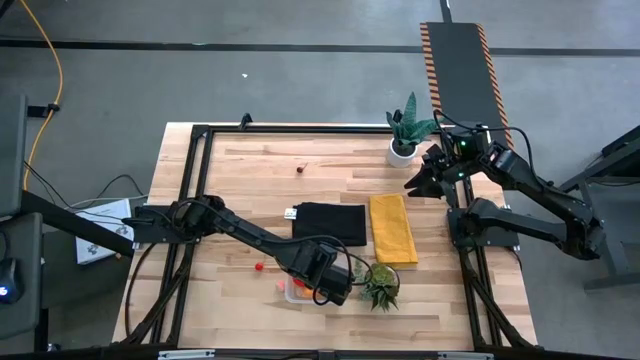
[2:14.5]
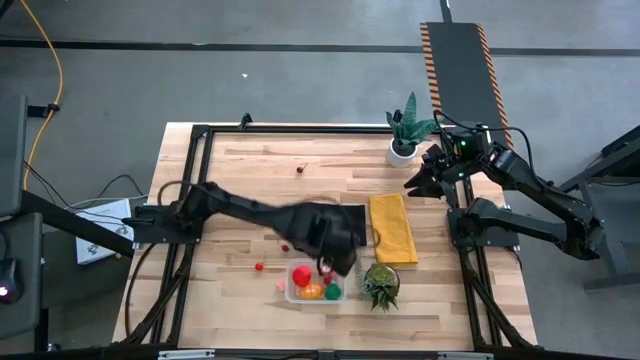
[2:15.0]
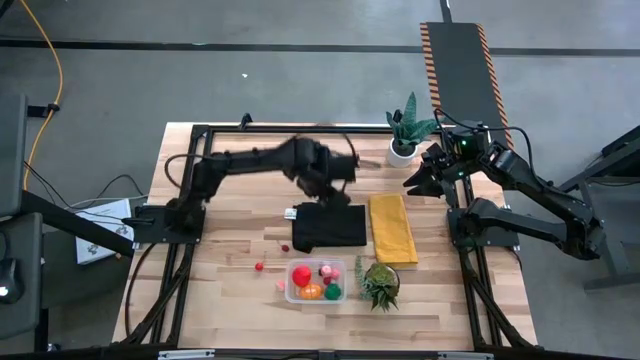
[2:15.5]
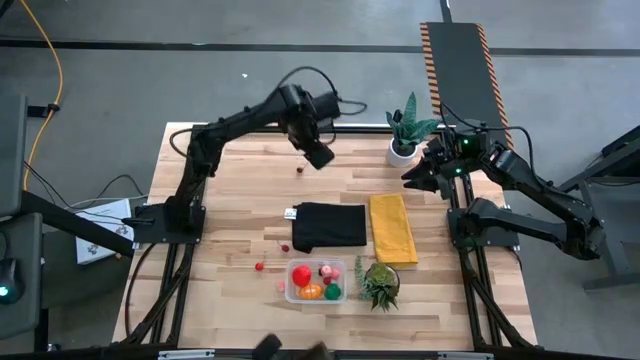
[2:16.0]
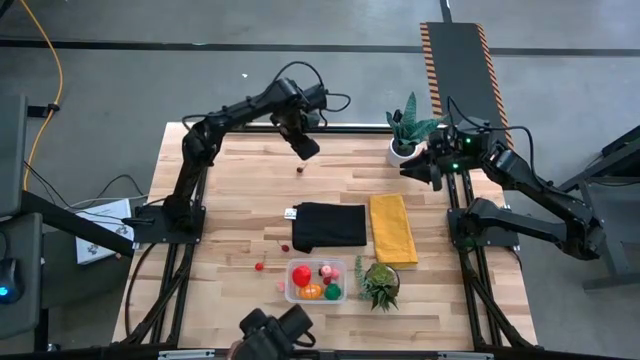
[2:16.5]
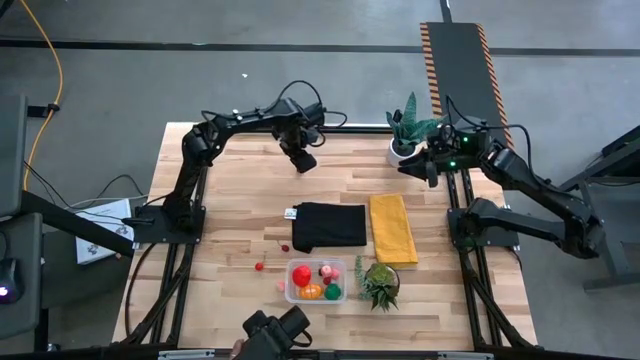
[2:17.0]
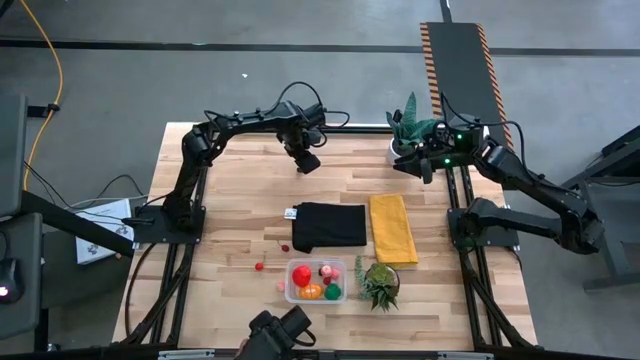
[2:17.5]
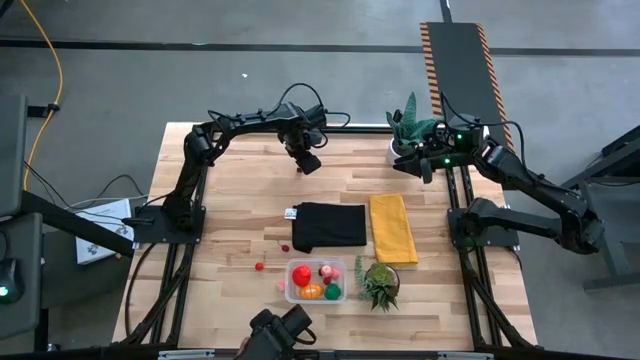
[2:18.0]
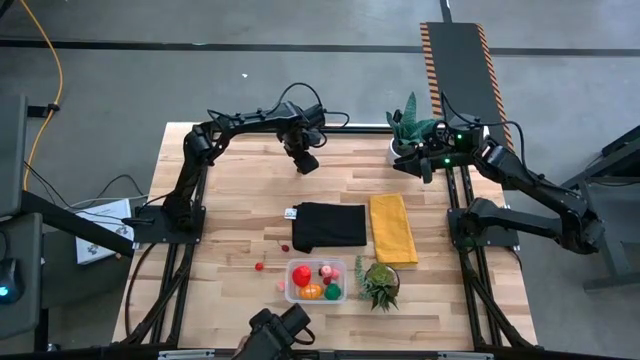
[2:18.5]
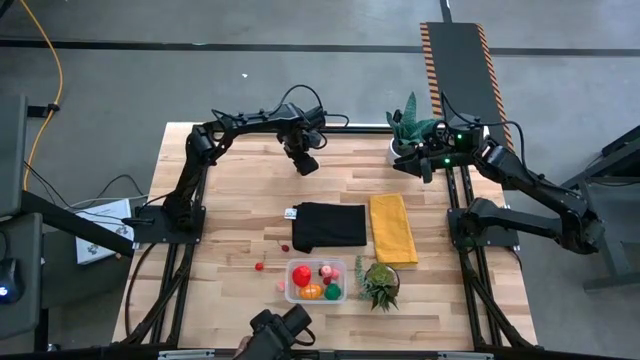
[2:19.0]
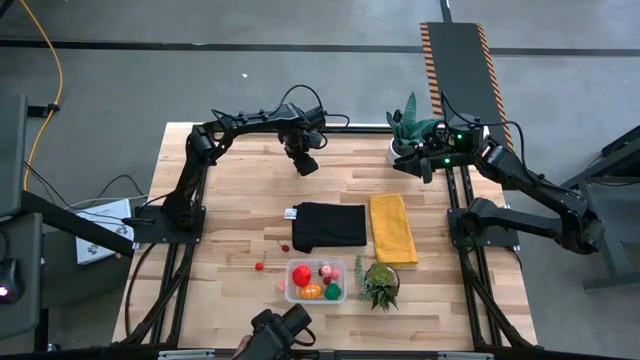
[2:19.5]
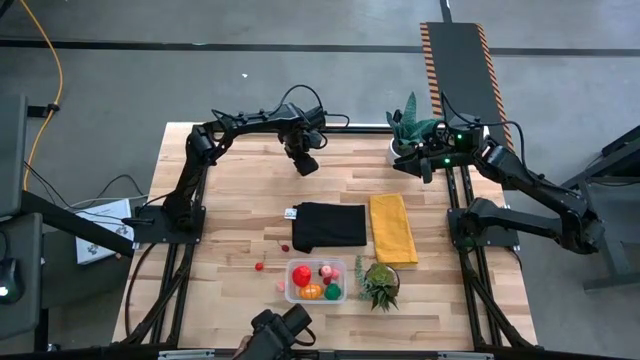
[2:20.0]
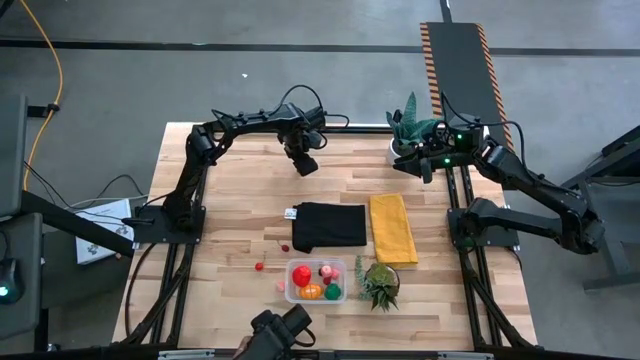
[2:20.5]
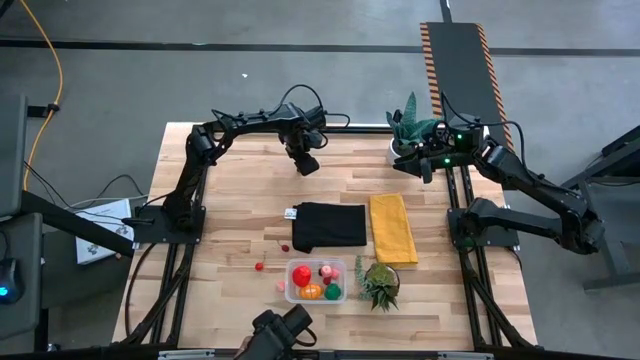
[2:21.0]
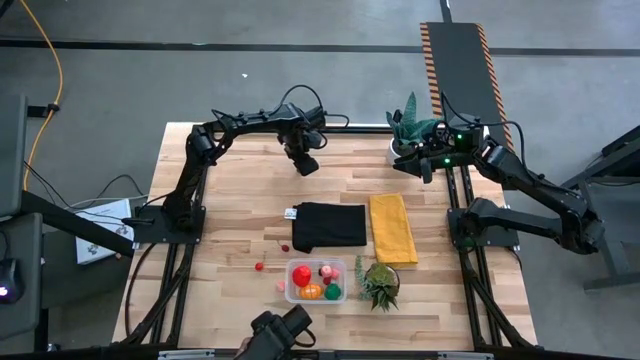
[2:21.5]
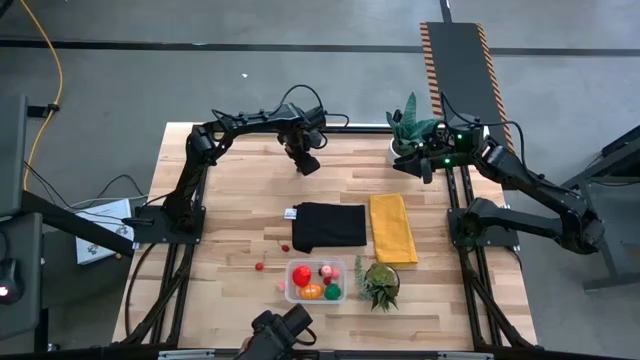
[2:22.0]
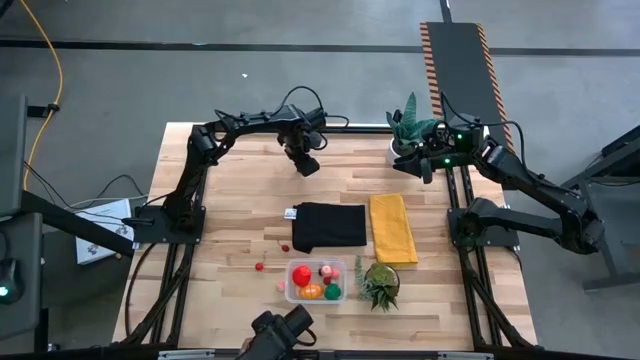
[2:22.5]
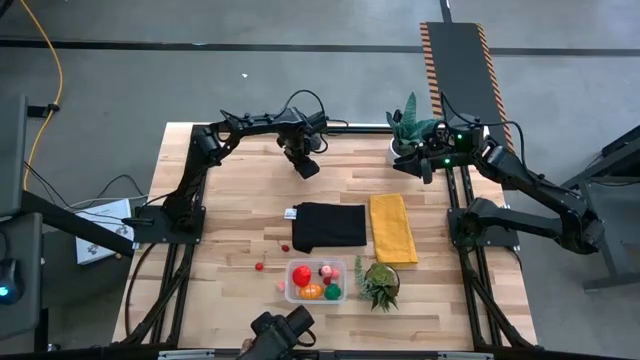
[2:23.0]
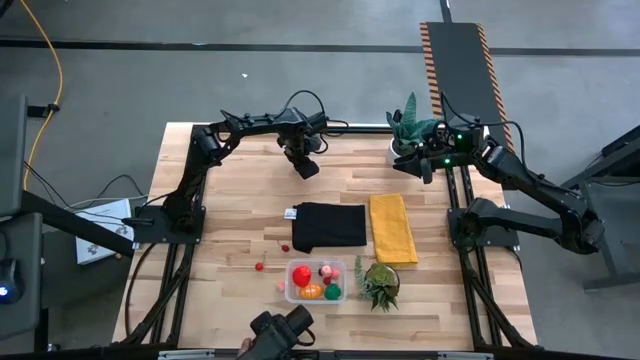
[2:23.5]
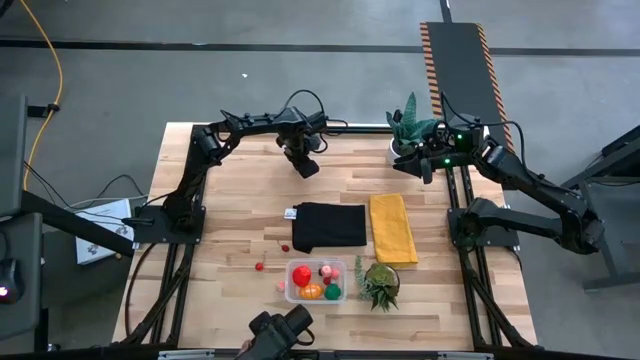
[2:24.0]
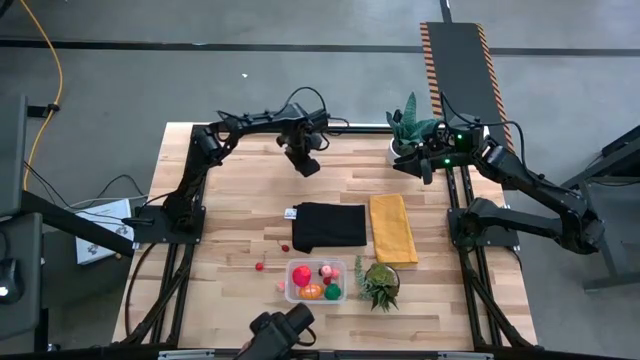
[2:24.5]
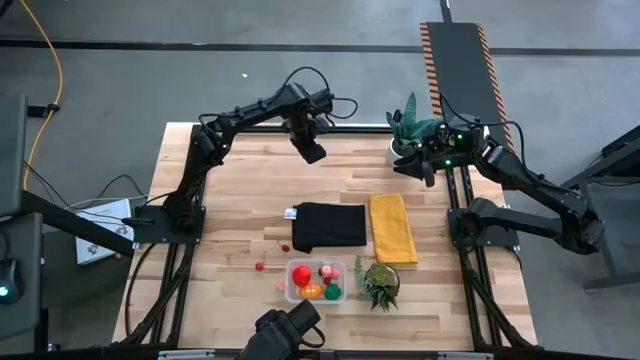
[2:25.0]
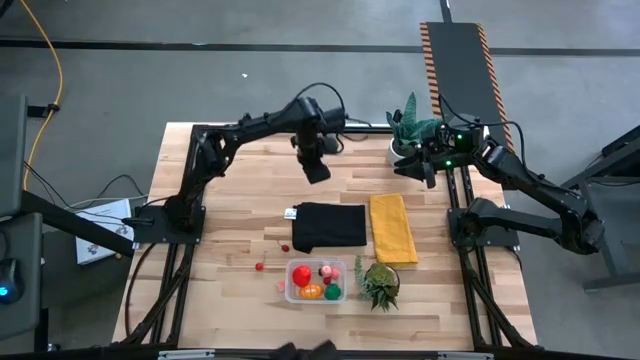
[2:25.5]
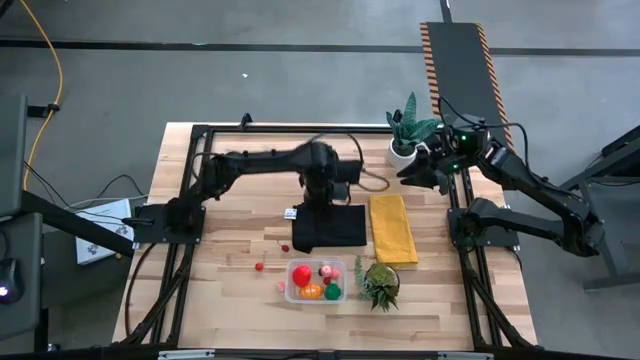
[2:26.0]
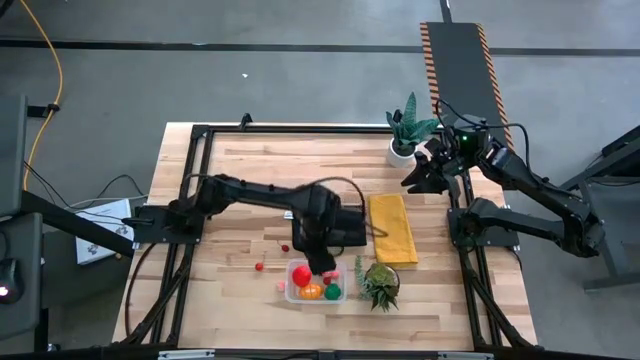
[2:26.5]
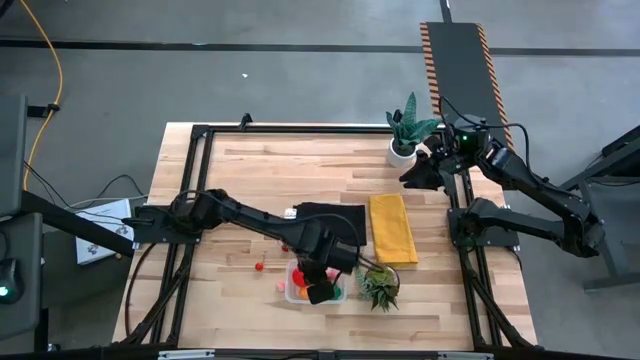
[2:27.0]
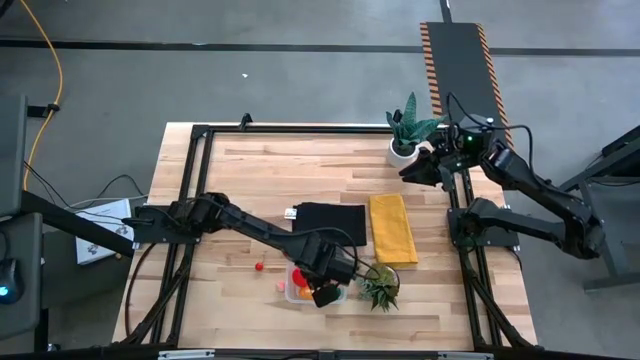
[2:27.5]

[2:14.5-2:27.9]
Task: Pick and placing Produce into tupperware
Put the top red cherry into the transparent bin

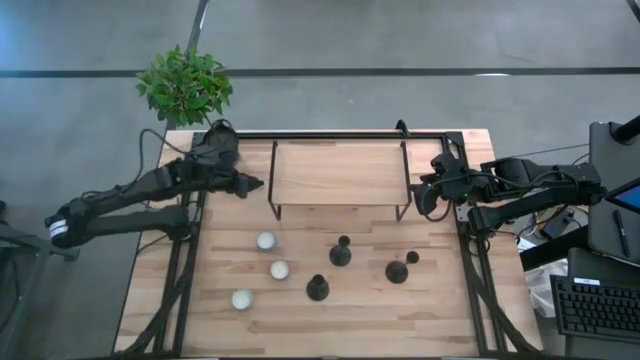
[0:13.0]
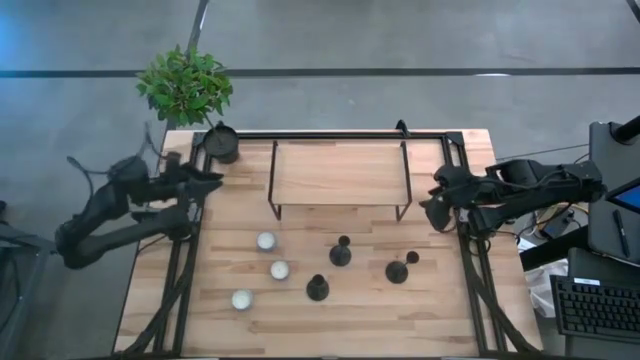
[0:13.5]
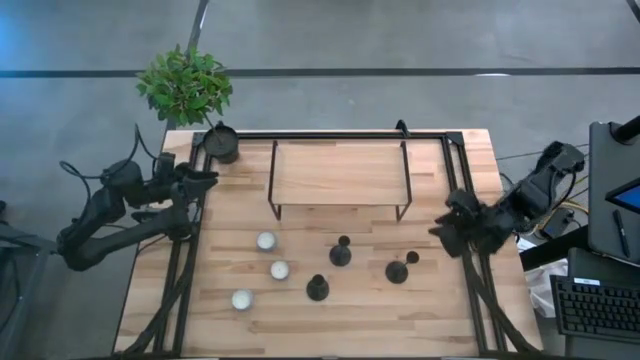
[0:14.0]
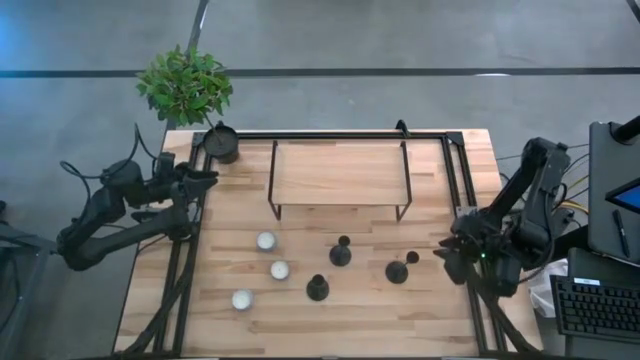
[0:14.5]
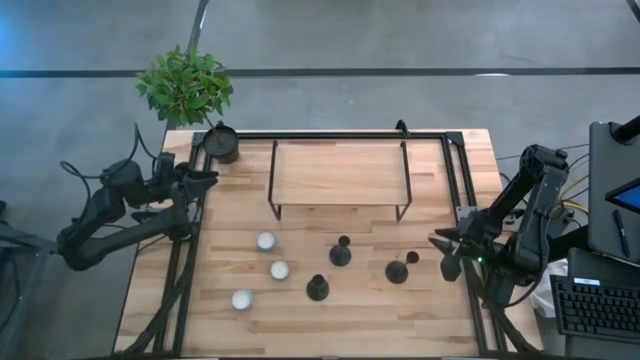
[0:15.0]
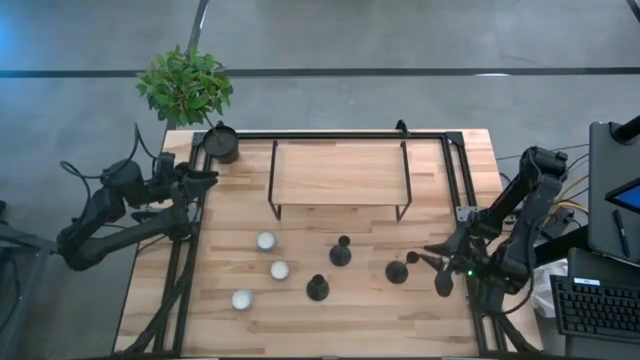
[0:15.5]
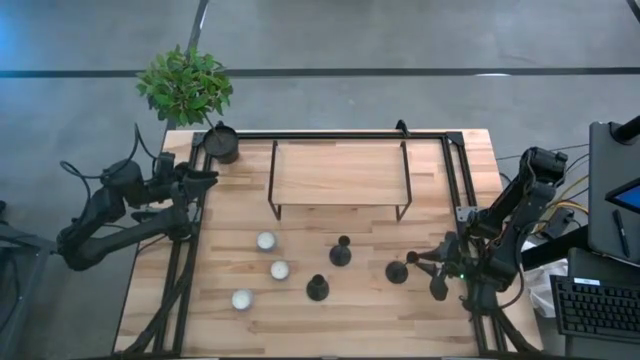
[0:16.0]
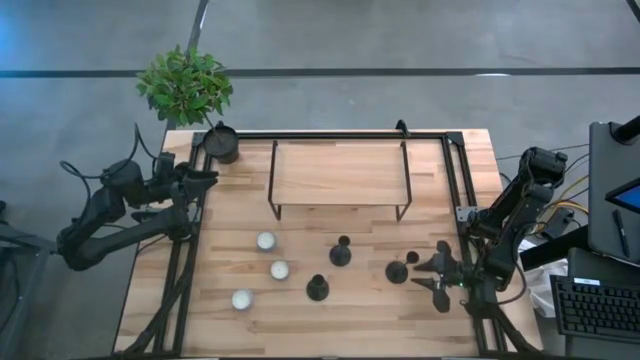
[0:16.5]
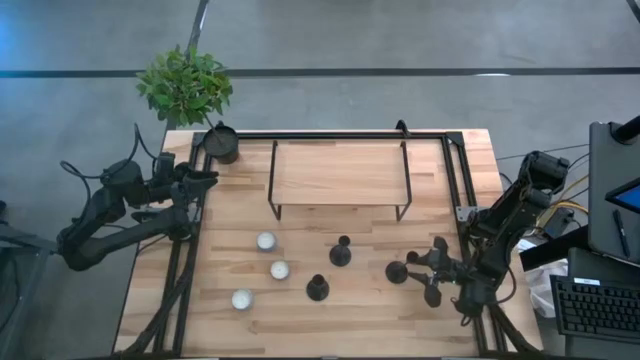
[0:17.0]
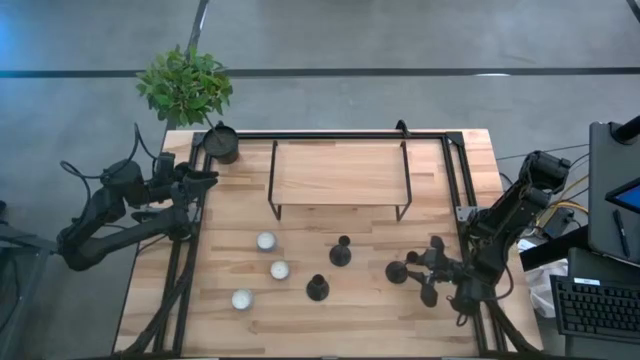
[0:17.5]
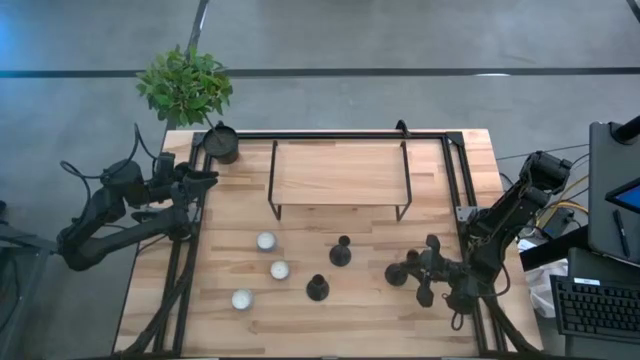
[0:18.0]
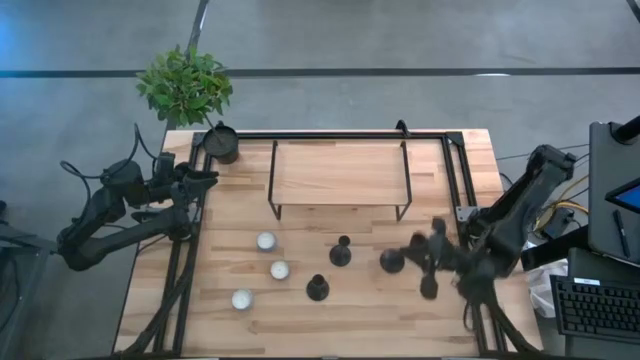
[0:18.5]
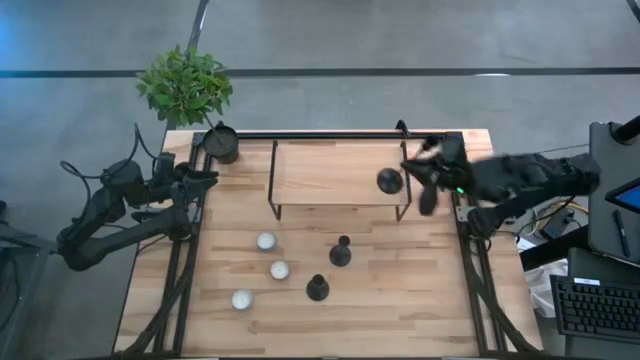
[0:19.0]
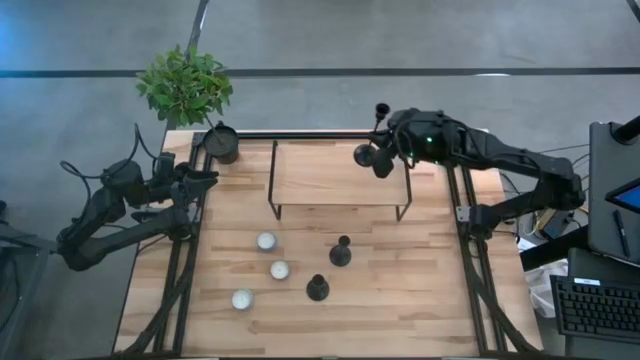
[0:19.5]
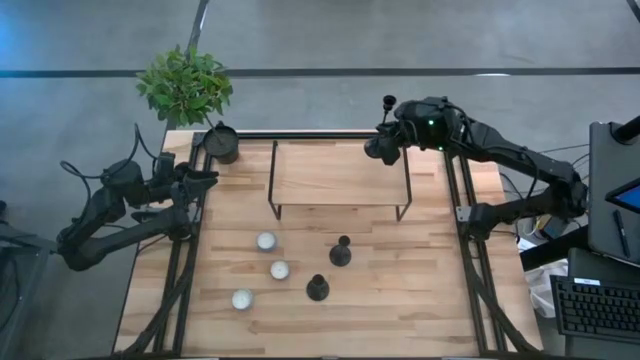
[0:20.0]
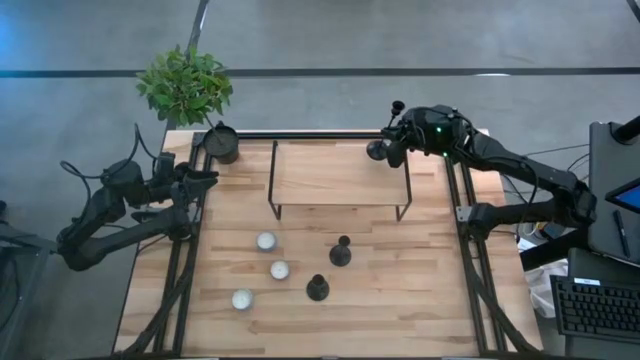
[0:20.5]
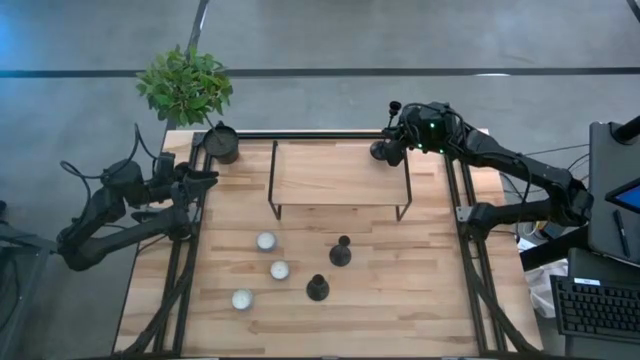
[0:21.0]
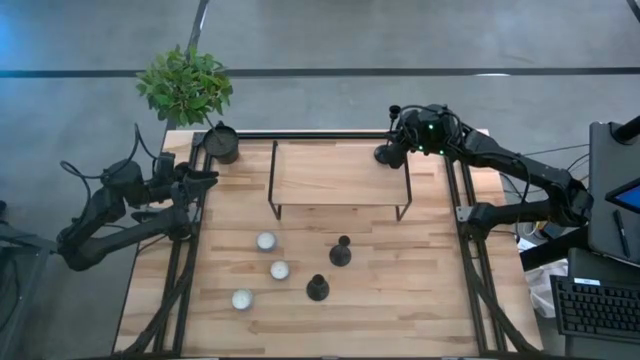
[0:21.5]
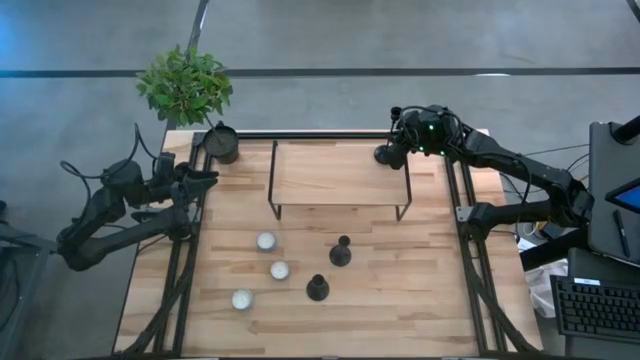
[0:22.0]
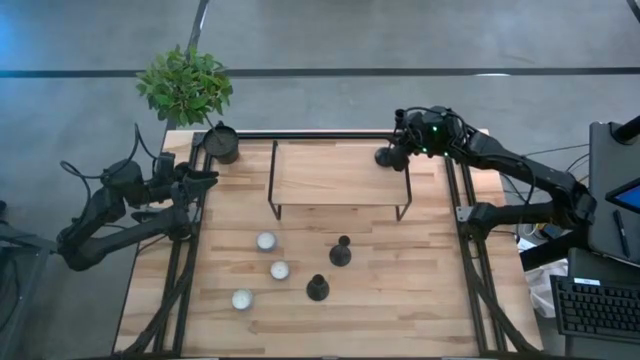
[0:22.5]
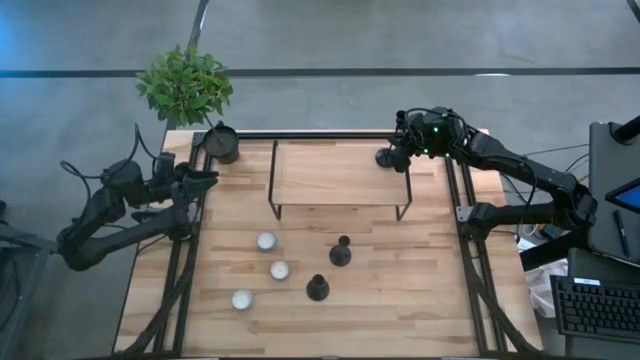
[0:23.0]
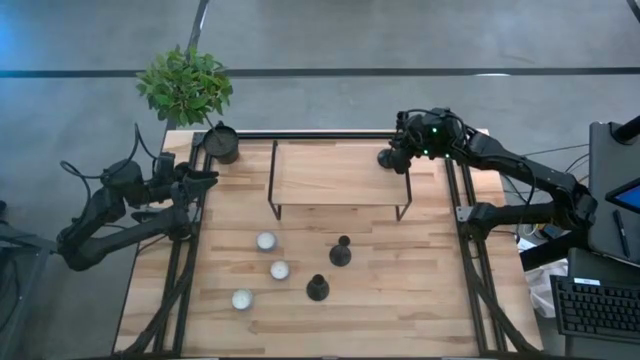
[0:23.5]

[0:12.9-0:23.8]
Task: Pick & Place candle stick holders
Put the middle right black candle holder on the shelf
